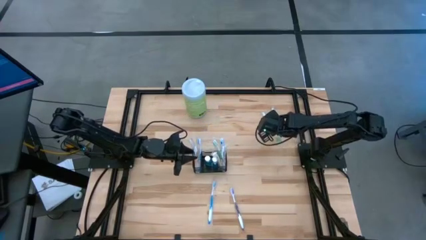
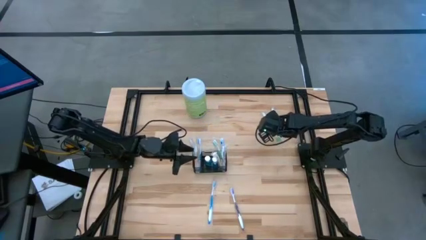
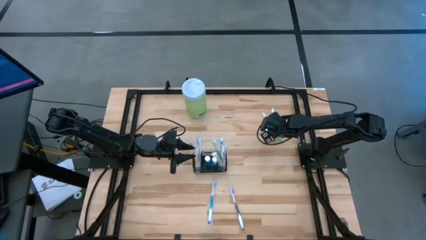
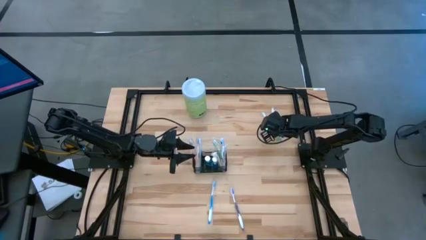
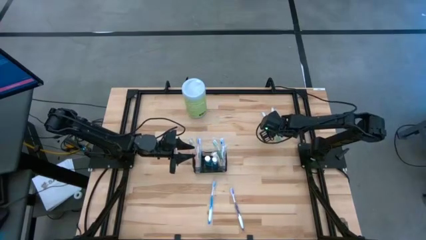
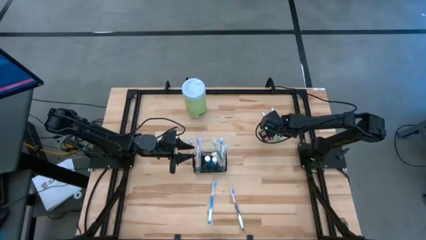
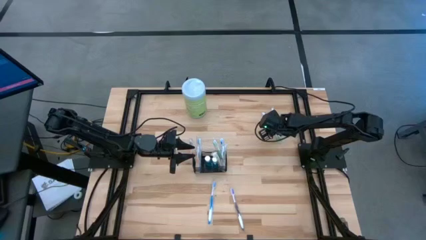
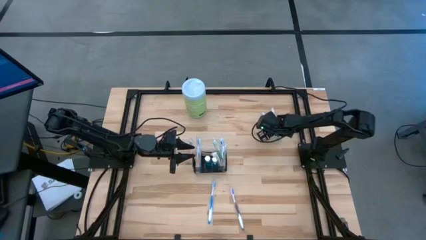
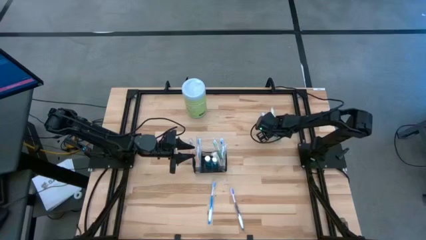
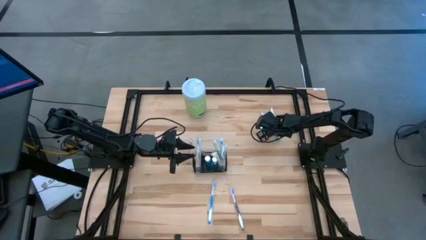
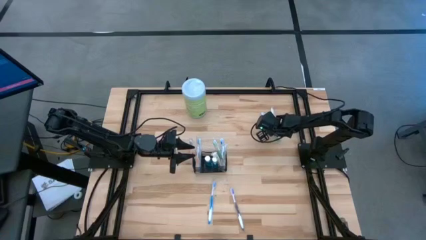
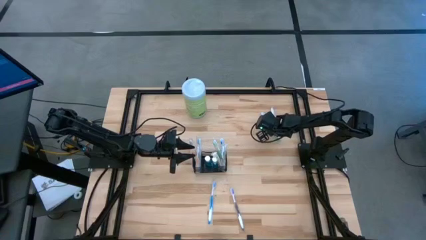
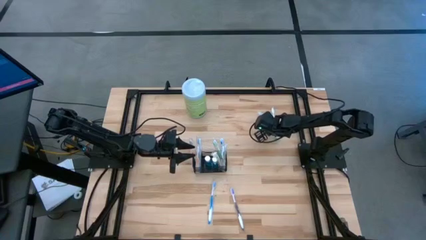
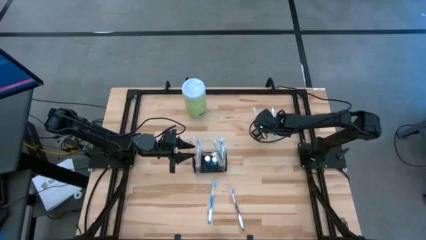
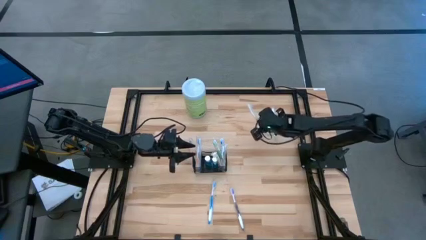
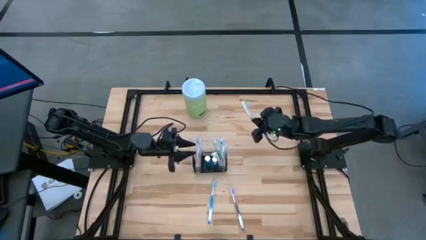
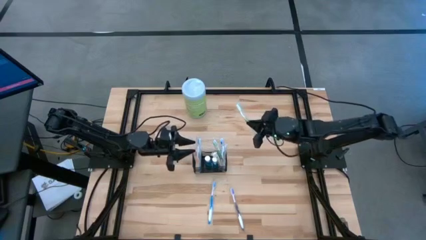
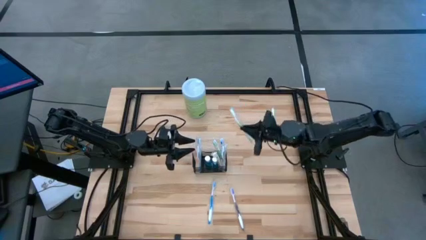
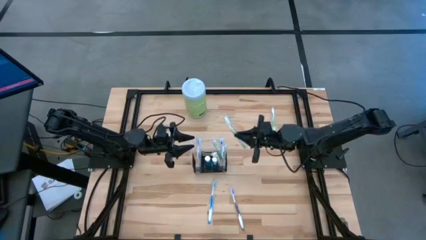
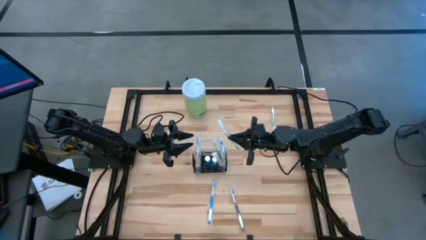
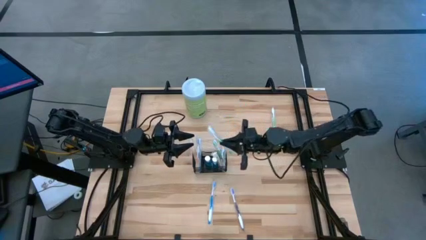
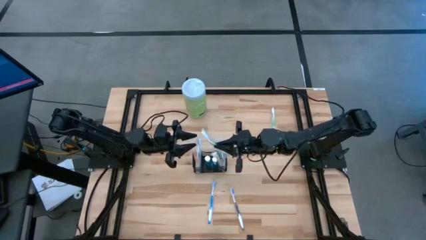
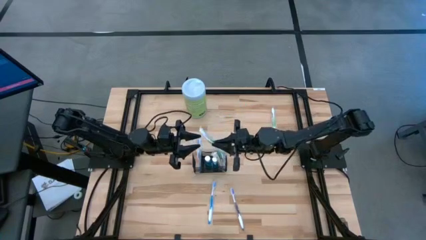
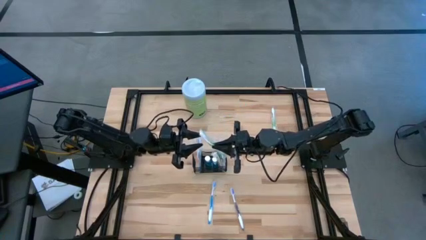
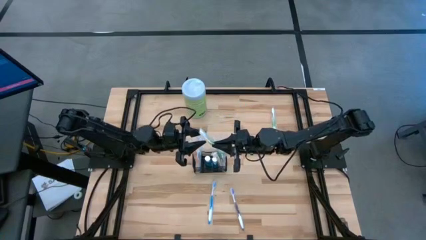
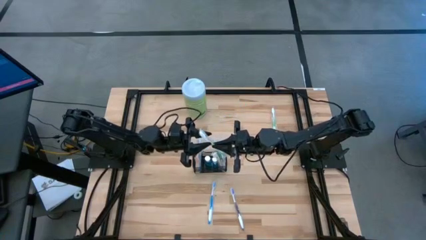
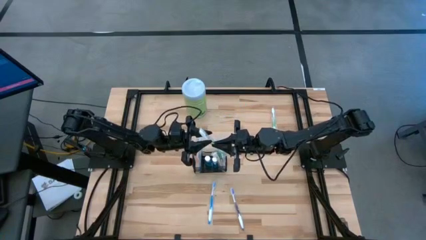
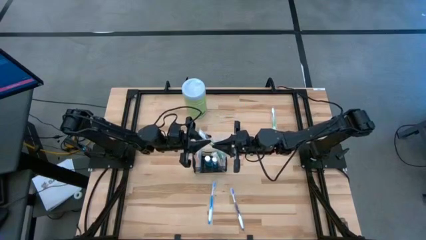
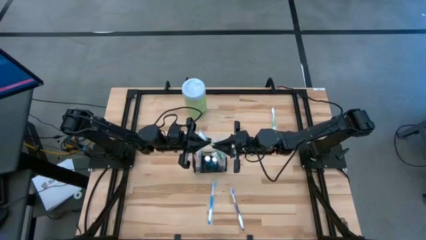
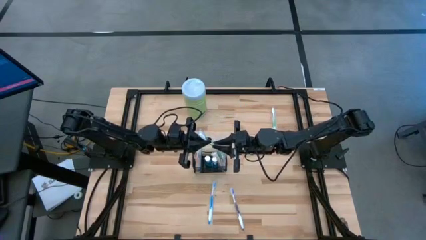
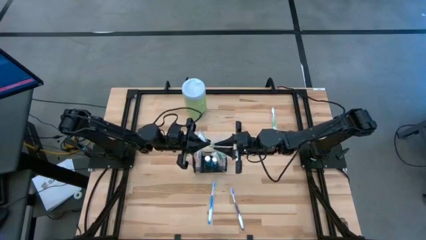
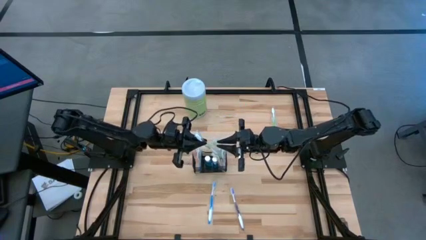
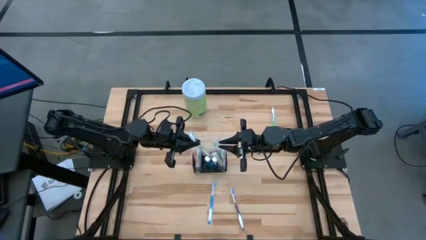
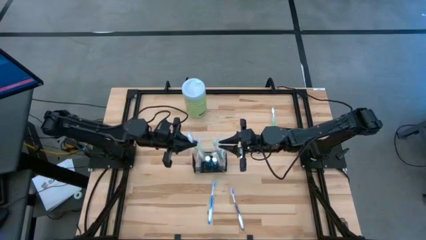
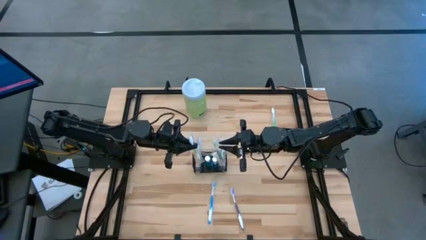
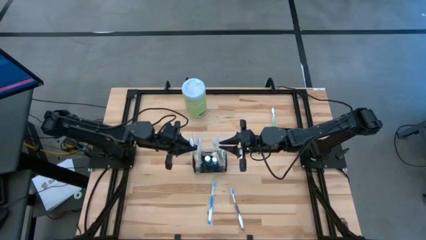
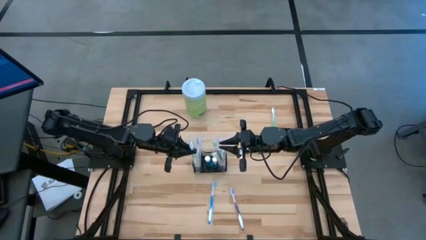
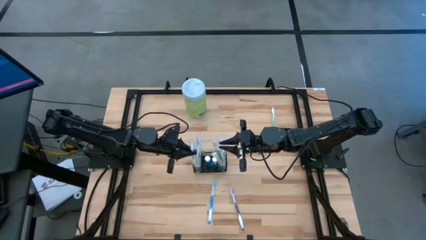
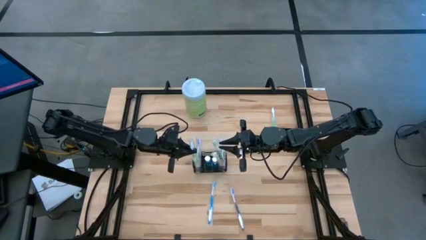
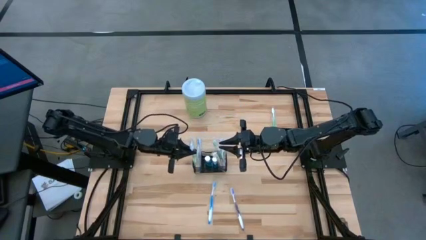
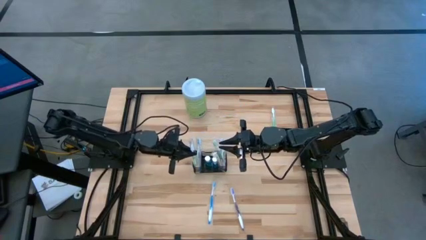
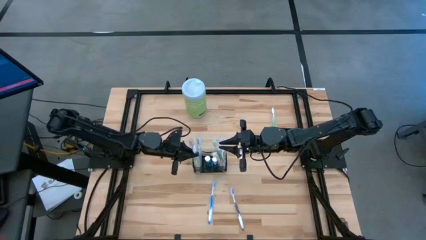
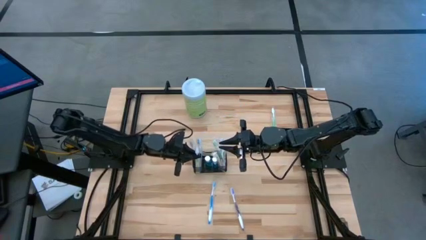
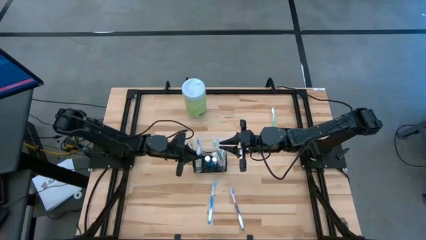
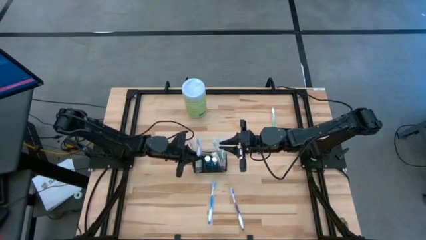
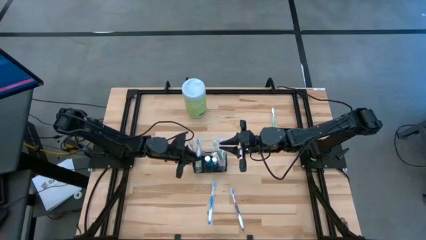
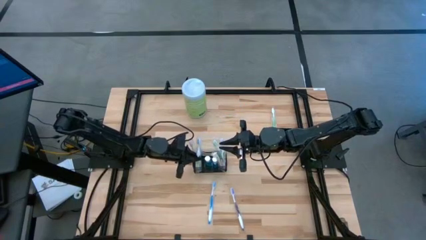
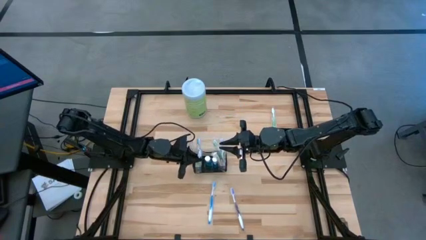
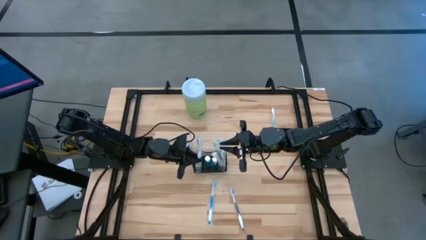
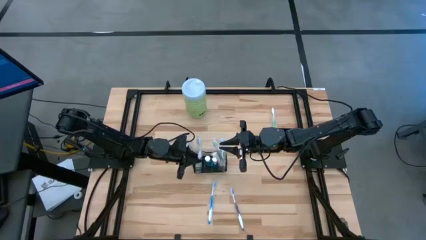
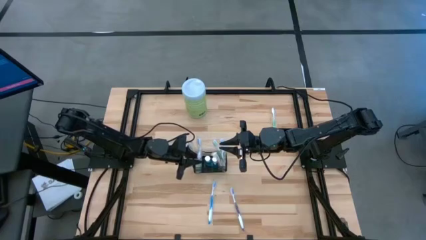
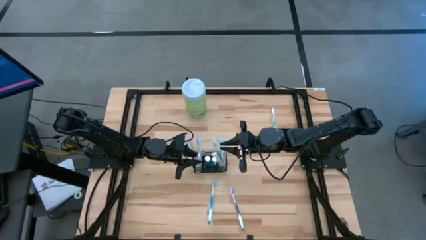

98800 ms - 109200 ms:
Task: Pick & Place toothbrushing station
Put the left green toothbrush into the wire organizer
